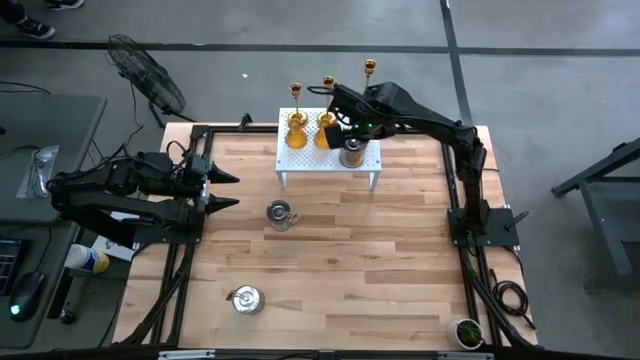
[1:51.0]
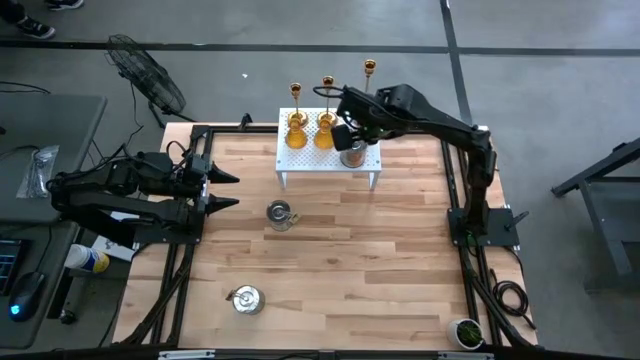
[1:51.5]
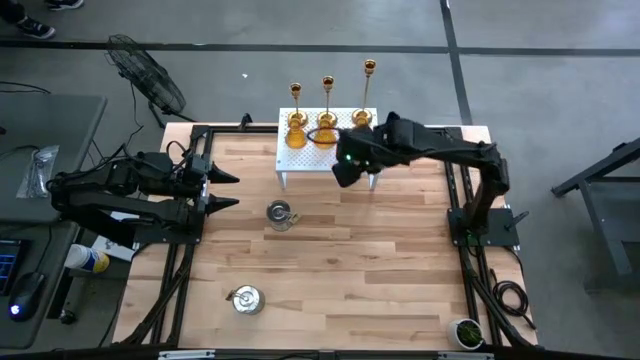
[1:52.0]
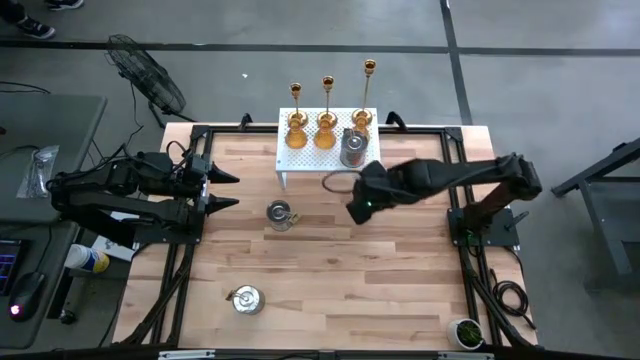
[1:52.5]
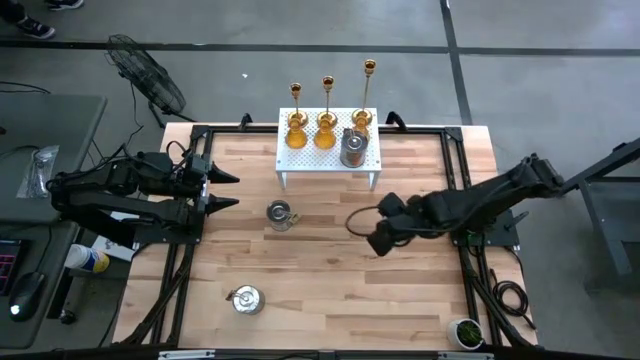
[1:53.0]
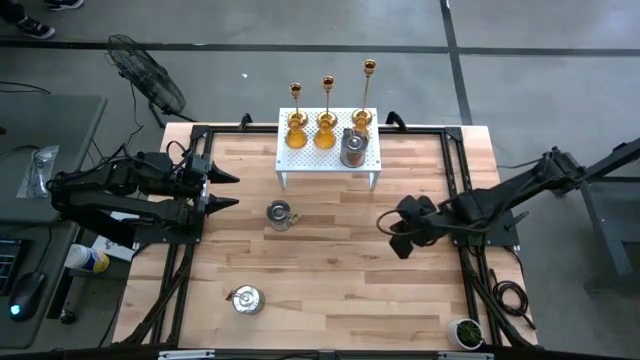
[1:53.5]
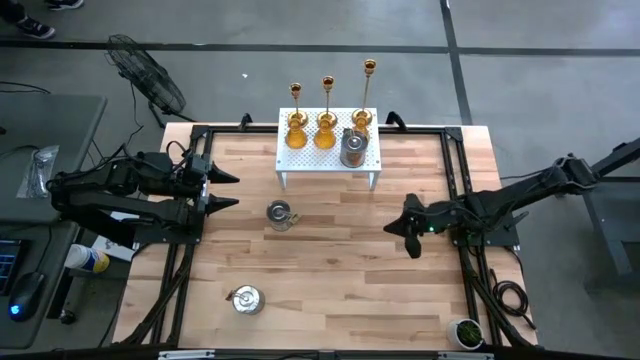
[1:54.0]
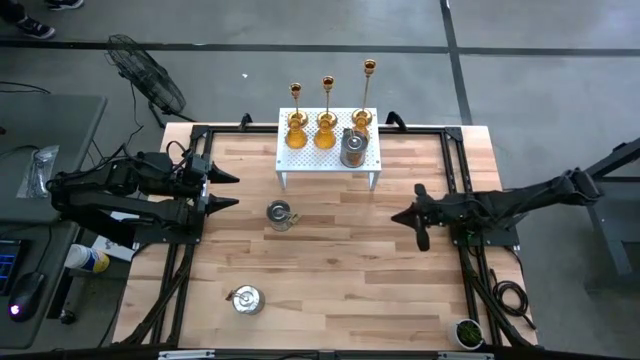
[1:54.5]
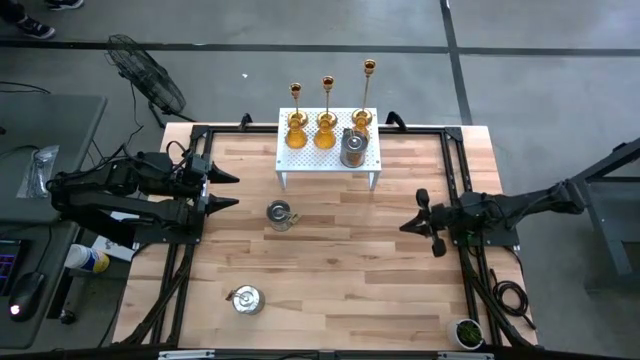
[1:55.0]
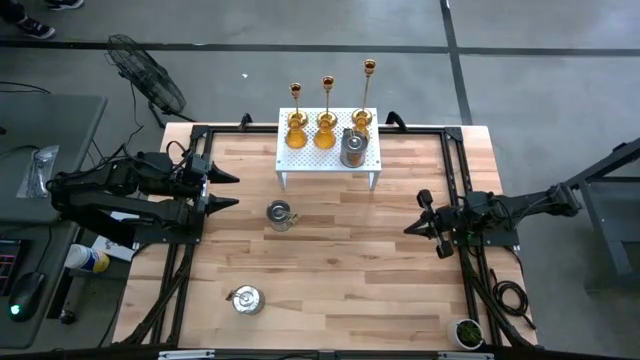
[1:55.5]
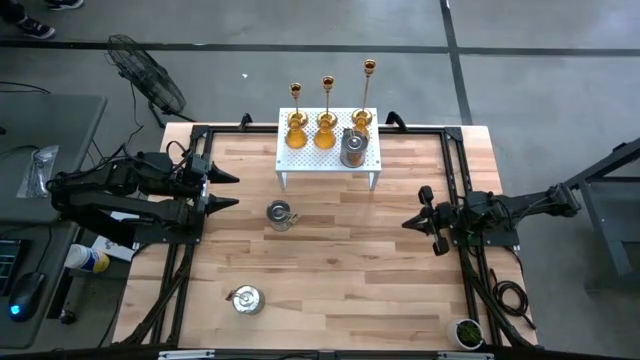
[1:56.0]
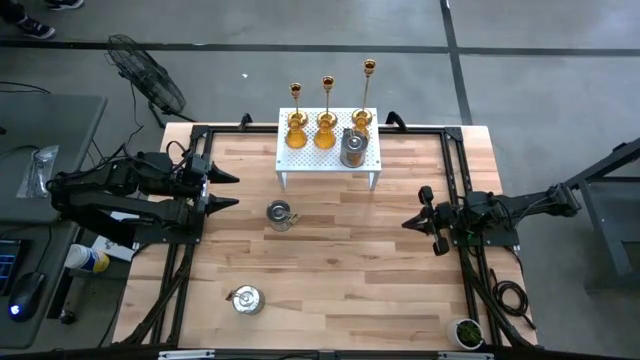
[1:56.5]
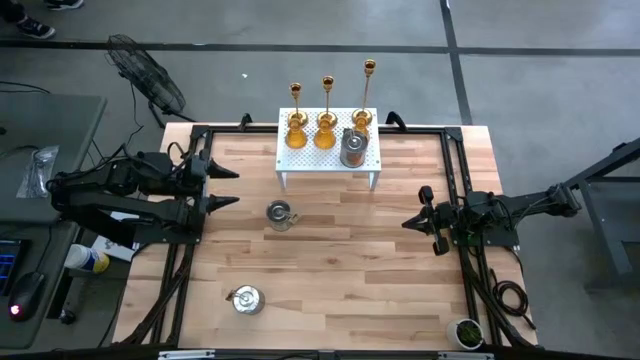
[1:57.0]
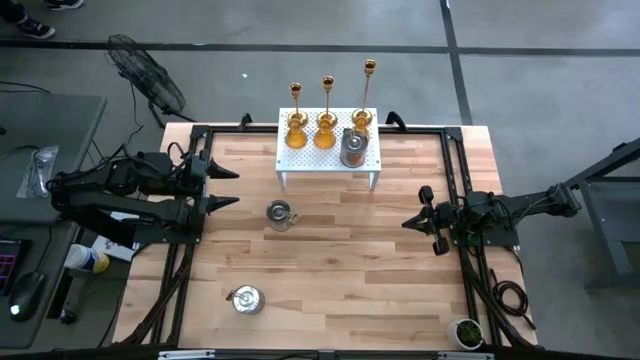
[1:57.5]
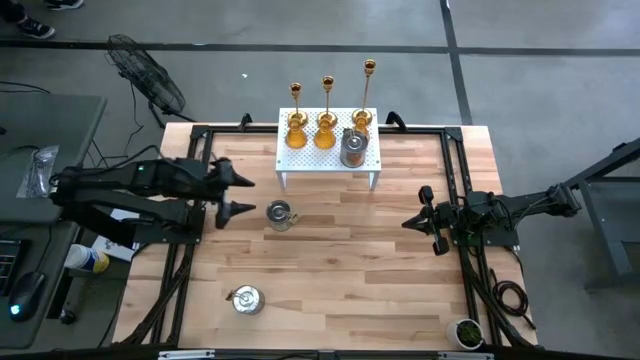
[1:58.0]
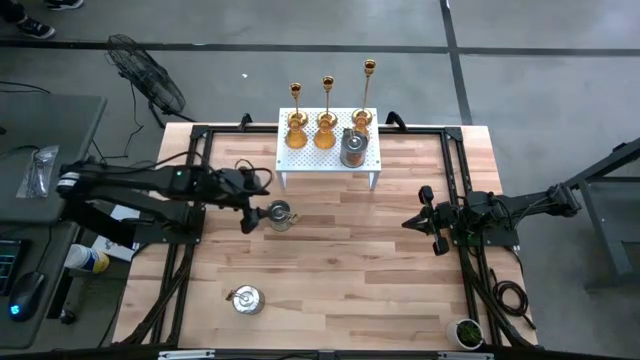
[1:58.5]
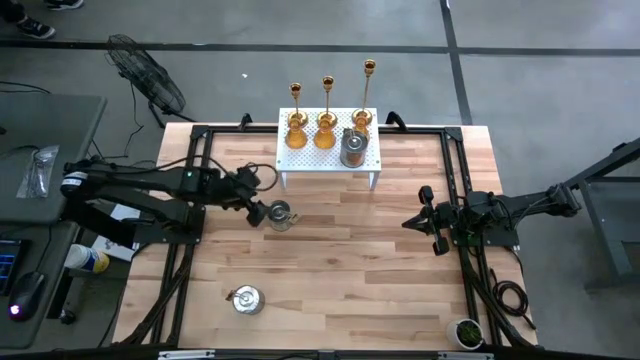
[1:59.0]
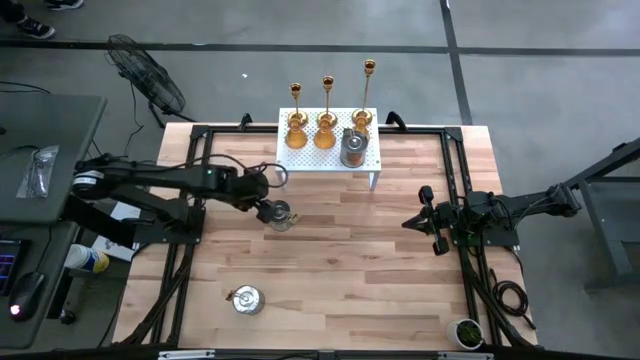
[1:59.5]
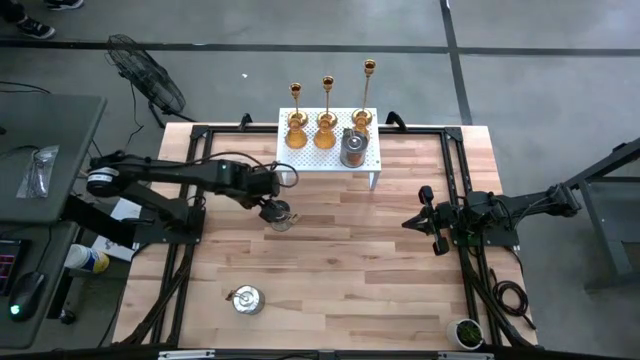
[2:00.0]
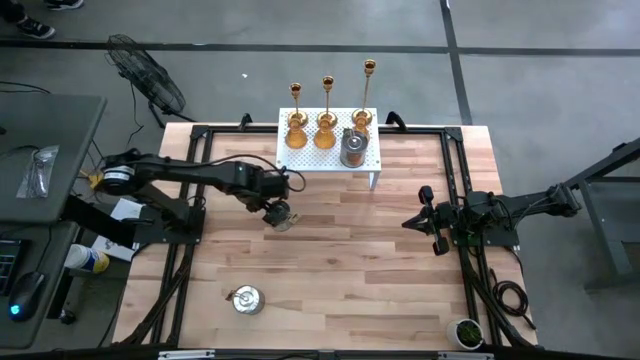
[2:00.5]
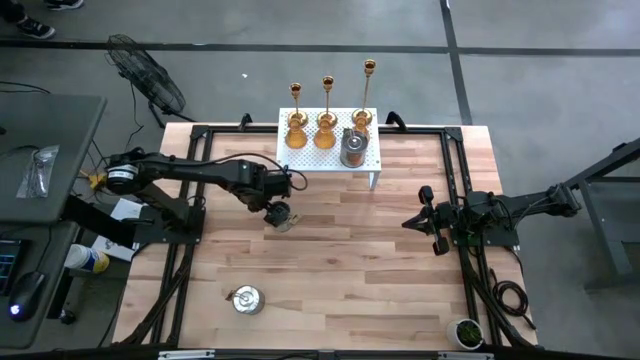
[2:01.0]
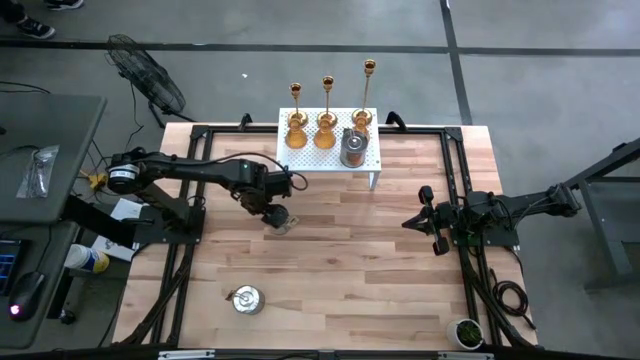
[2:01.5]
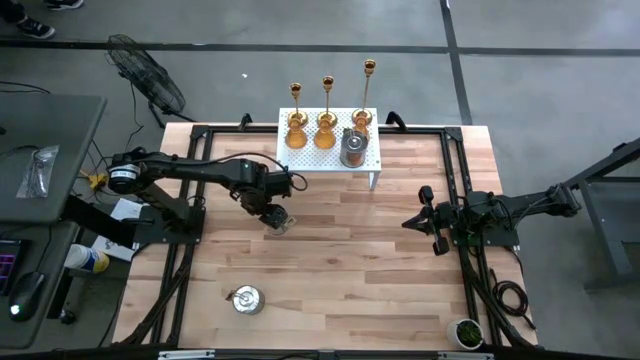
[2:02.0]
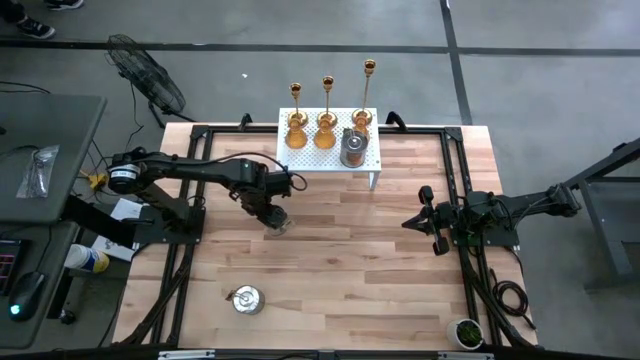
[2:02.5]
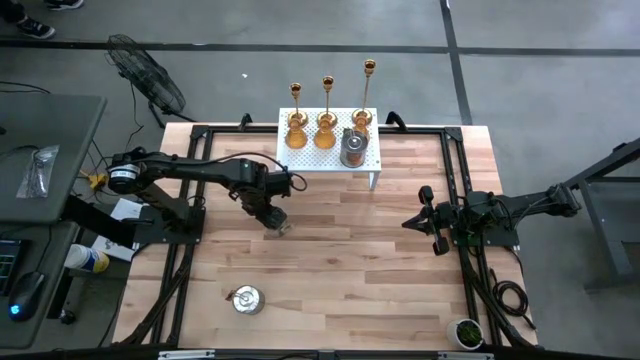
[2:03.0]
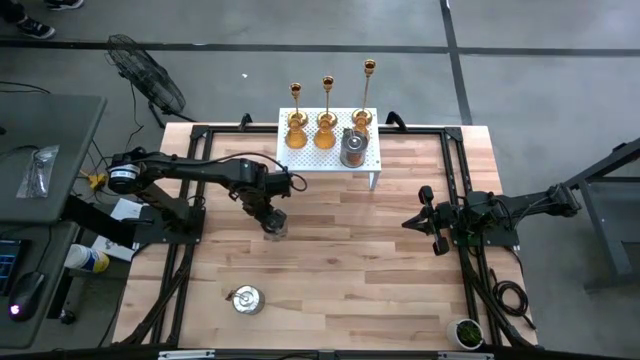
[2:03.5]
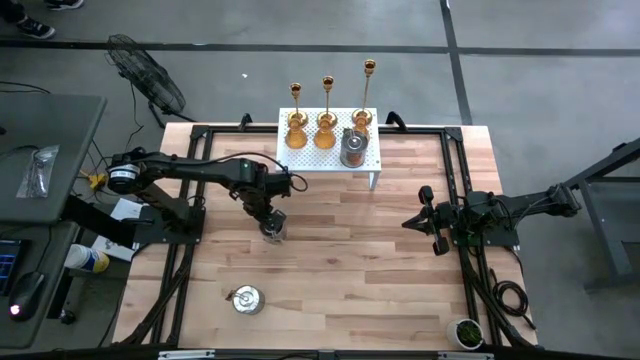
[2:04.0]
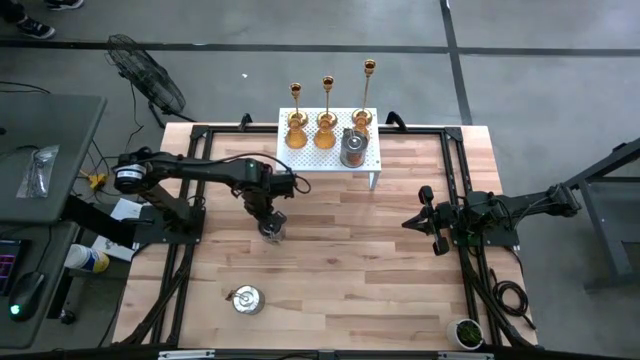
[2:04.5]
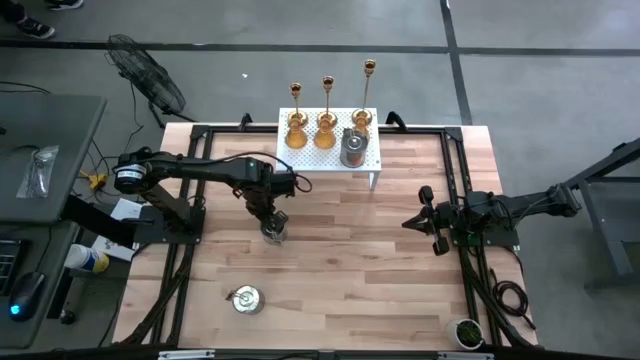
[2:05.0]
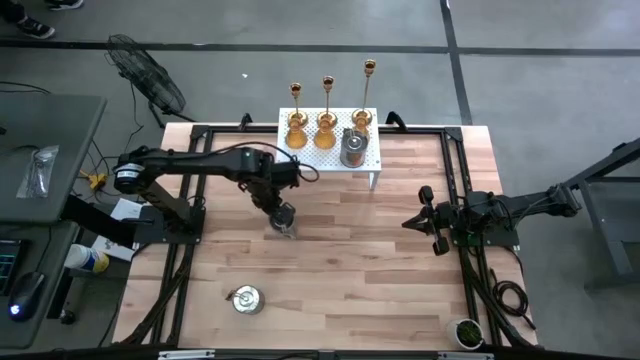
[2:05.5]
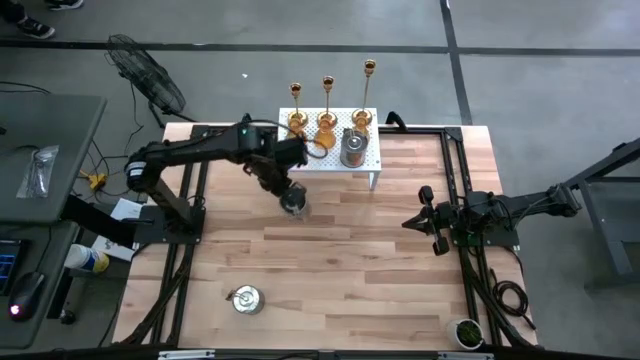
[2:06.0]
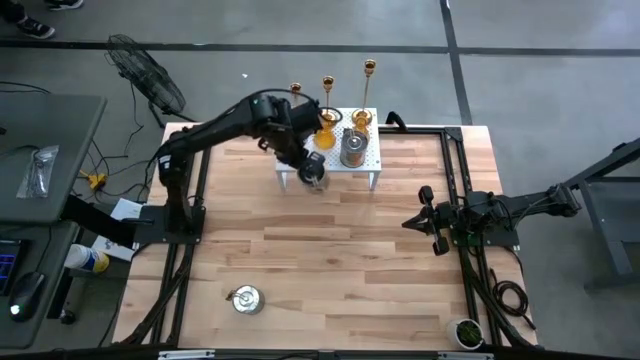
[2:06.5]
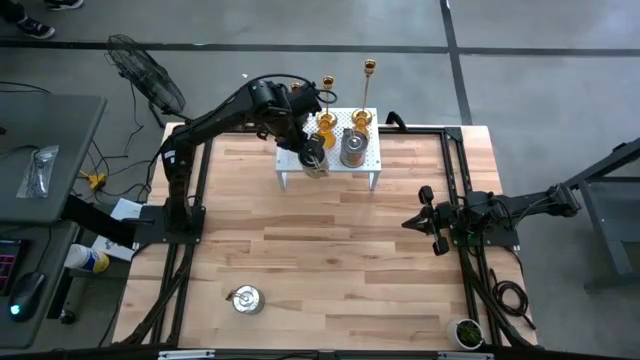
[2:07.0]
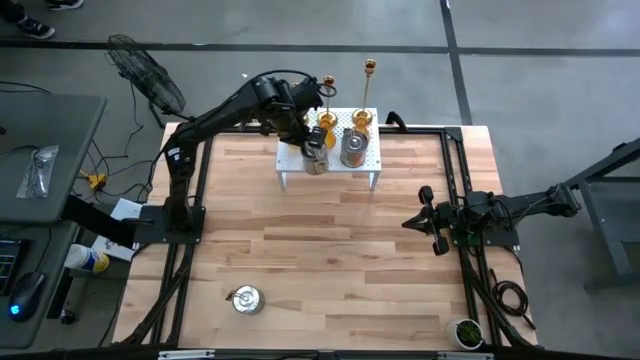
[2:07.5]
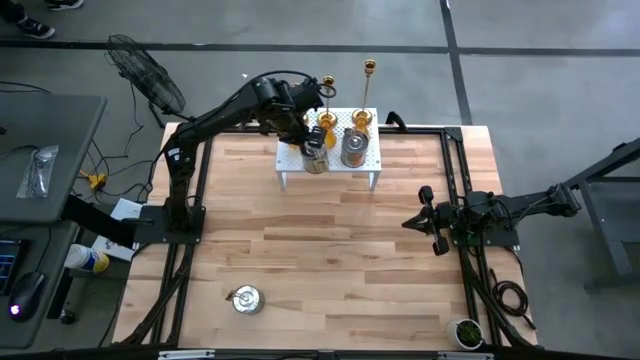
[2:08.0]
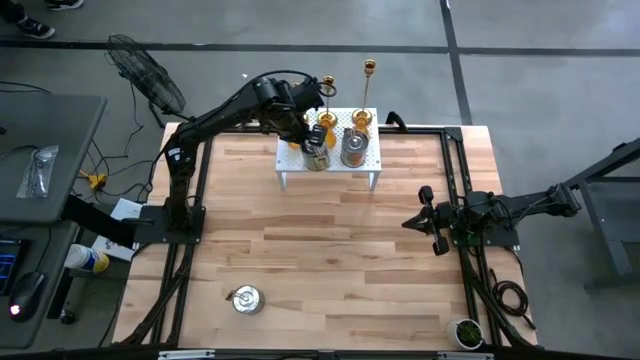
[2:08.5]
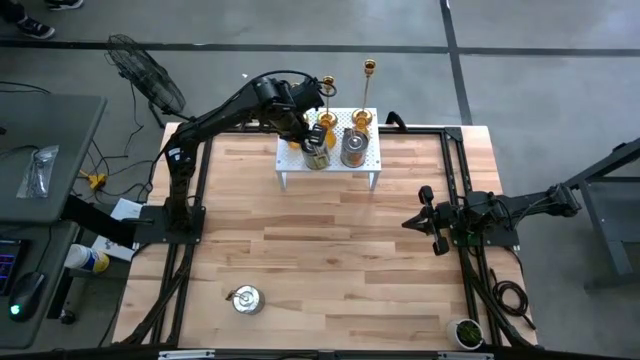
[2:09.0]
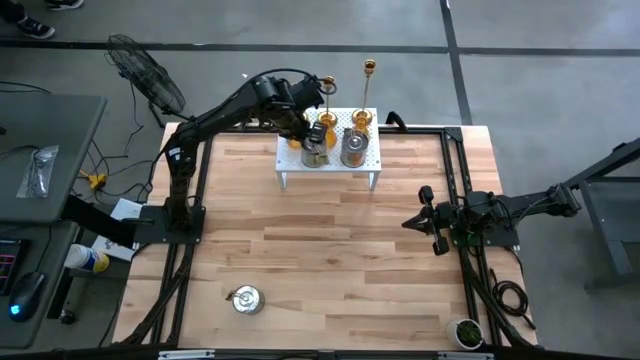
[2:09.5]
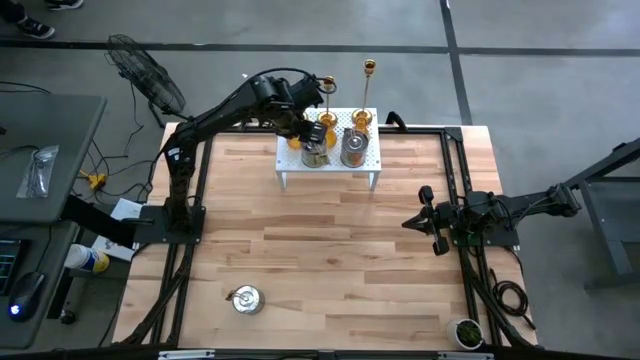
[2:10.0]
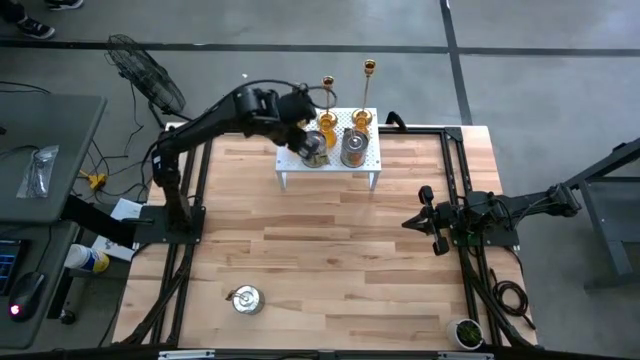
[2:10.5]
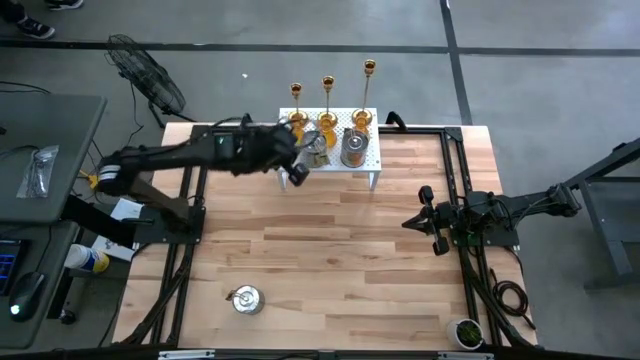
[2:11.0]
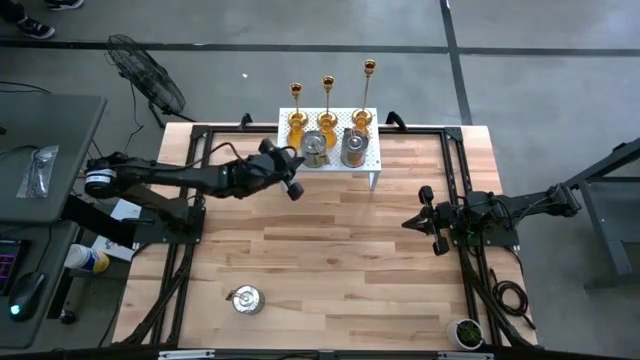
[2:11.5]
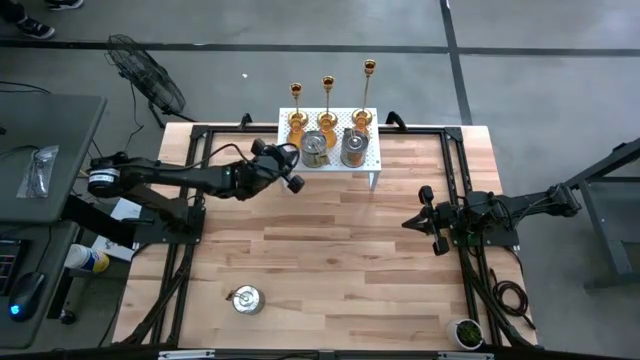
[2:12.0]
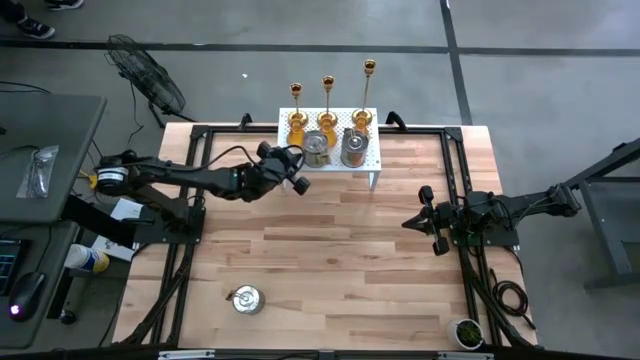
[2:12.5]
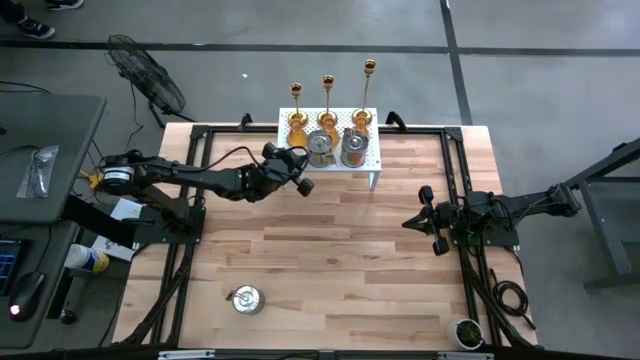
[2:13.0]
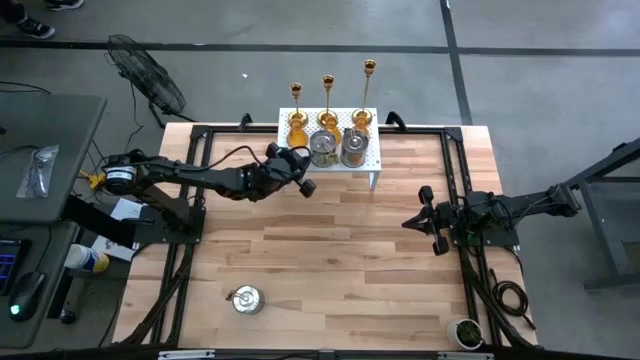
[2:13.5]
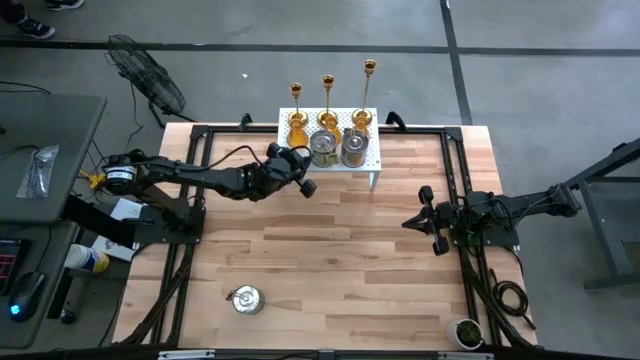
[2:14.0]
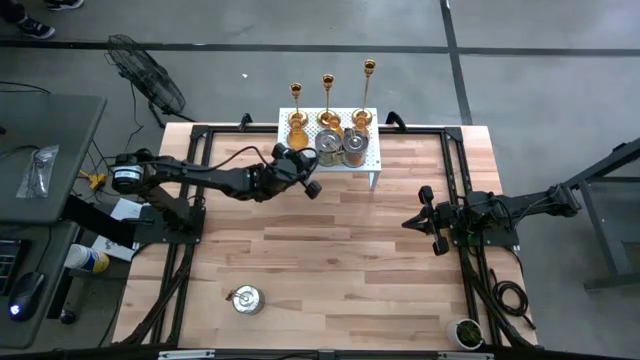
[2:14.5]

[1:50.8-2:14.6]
Task: Pick & Place candle stick holders
Put the top silver scented candle on the shelf aligned with the other silver scented candle
